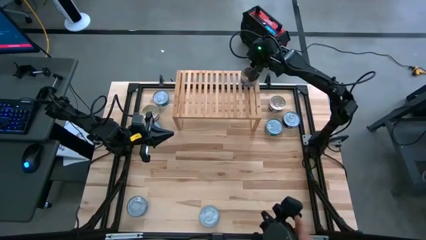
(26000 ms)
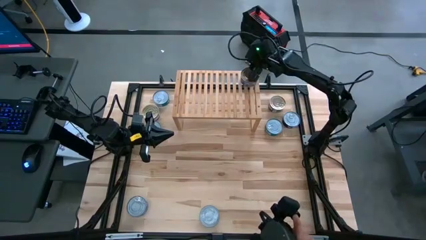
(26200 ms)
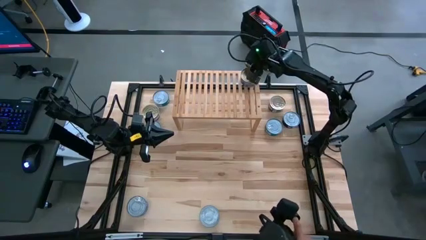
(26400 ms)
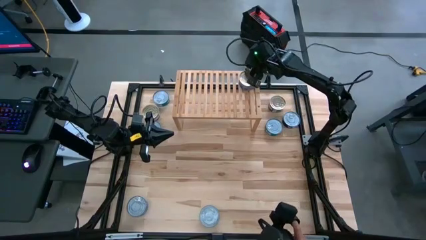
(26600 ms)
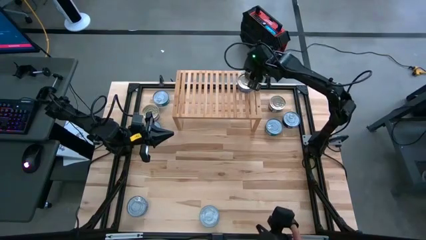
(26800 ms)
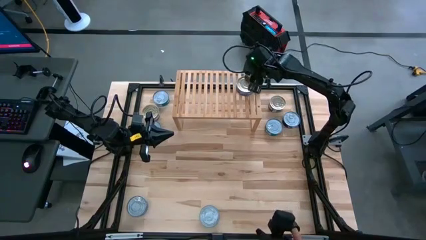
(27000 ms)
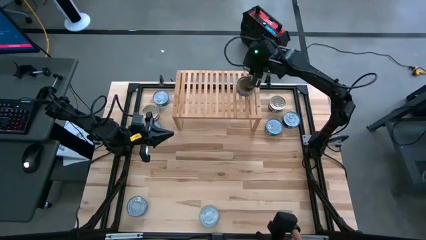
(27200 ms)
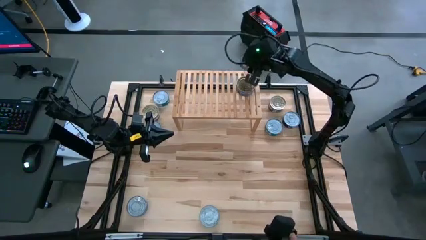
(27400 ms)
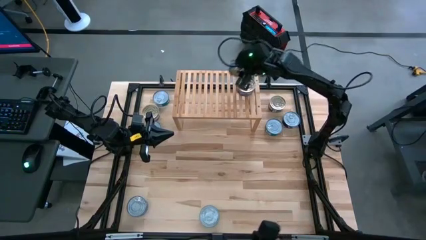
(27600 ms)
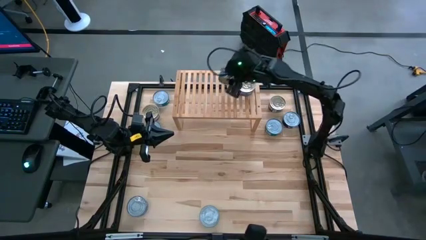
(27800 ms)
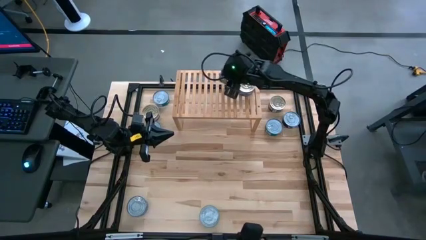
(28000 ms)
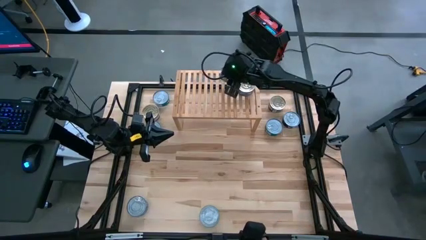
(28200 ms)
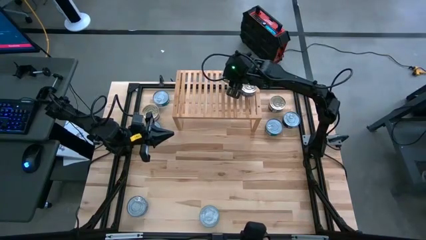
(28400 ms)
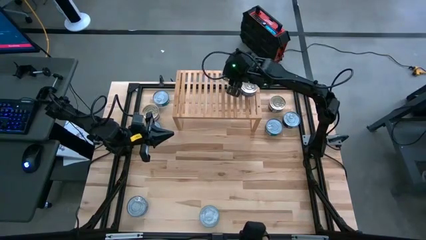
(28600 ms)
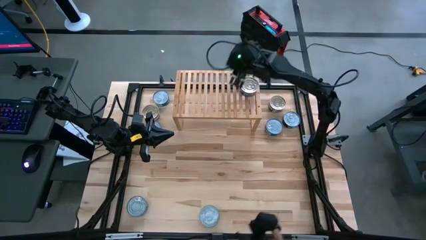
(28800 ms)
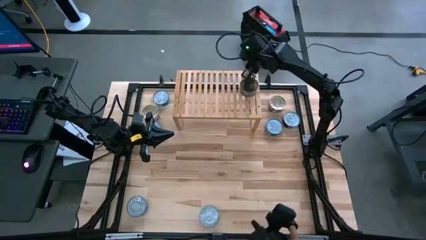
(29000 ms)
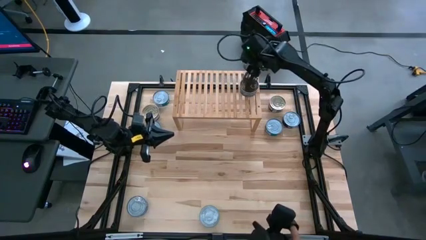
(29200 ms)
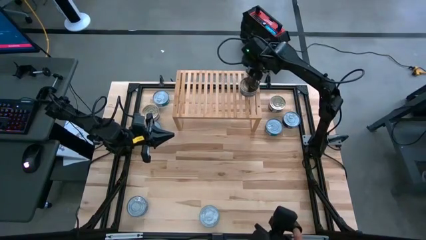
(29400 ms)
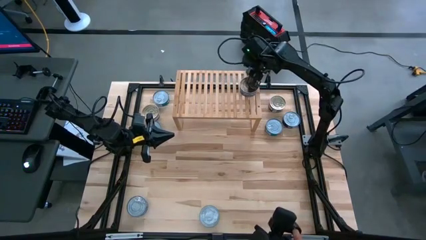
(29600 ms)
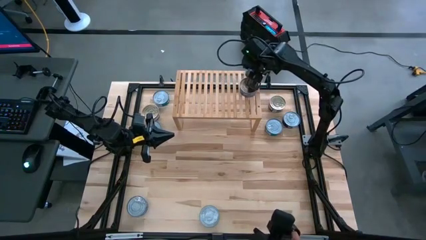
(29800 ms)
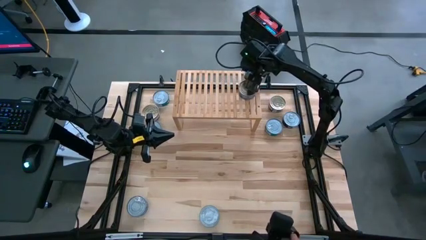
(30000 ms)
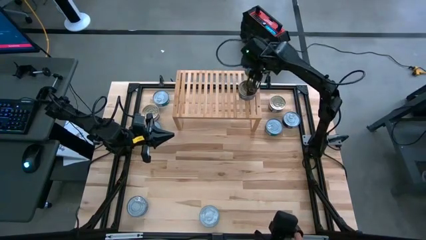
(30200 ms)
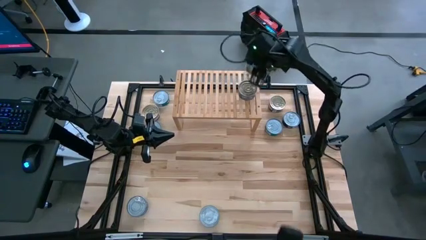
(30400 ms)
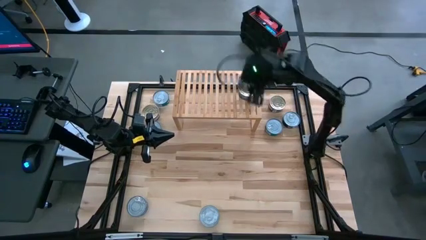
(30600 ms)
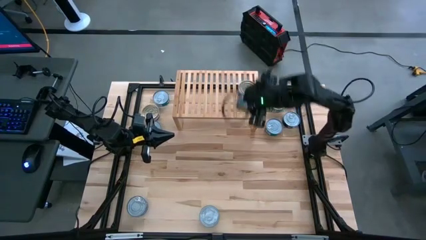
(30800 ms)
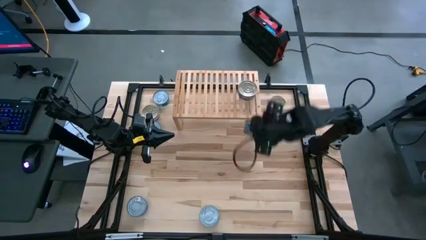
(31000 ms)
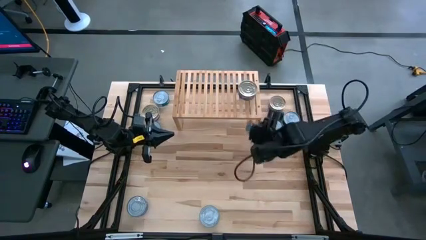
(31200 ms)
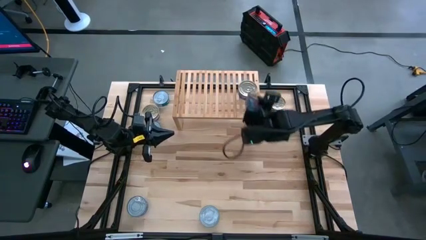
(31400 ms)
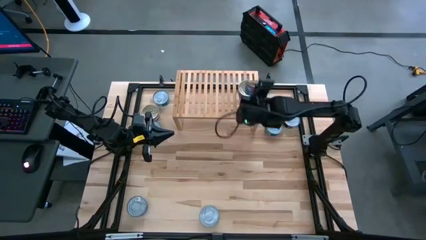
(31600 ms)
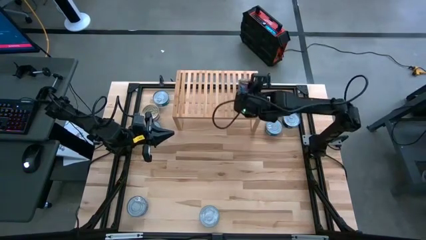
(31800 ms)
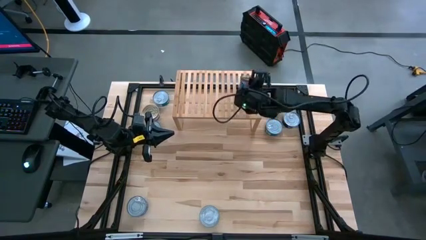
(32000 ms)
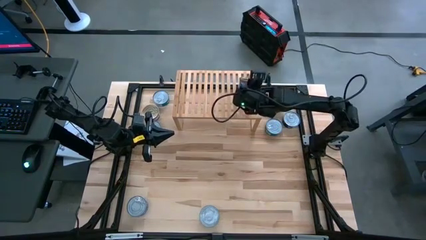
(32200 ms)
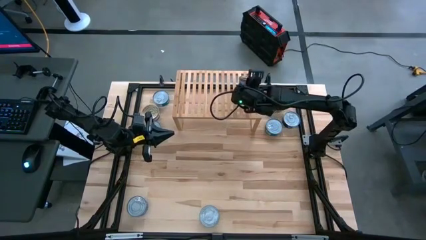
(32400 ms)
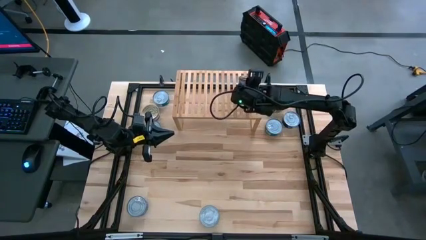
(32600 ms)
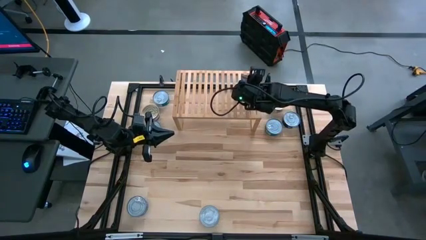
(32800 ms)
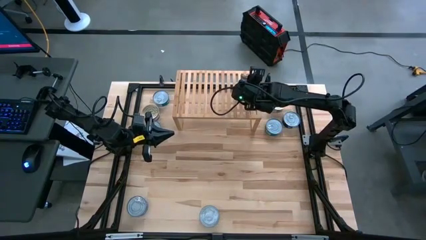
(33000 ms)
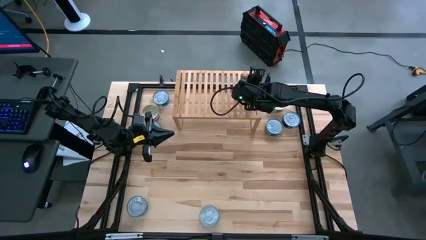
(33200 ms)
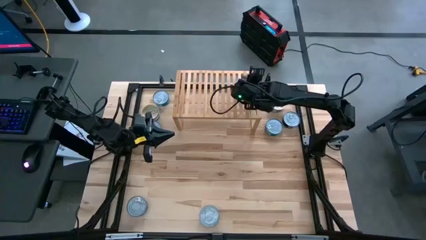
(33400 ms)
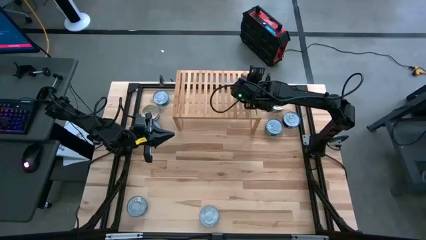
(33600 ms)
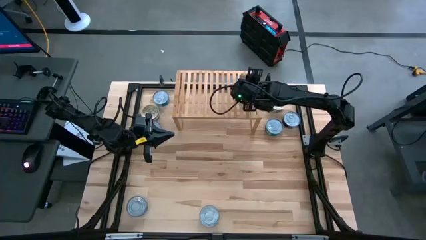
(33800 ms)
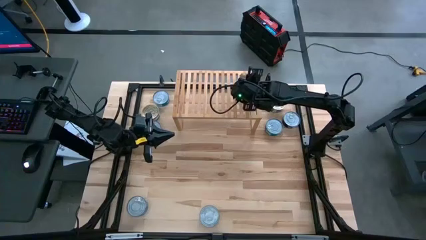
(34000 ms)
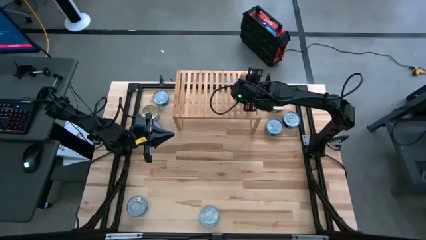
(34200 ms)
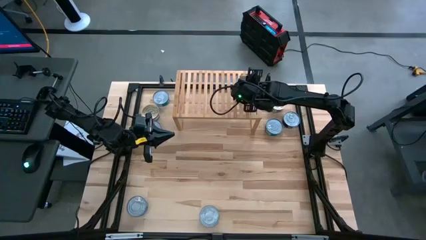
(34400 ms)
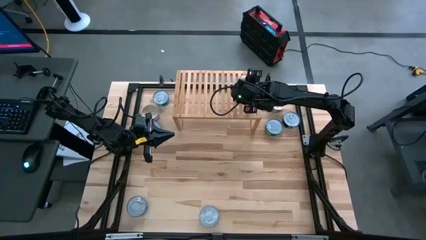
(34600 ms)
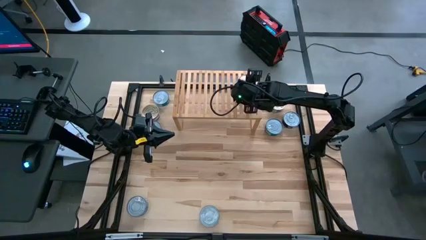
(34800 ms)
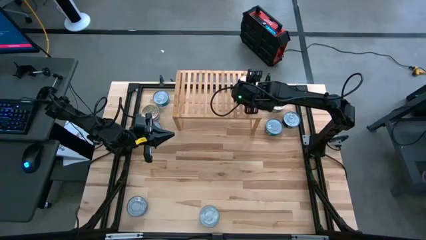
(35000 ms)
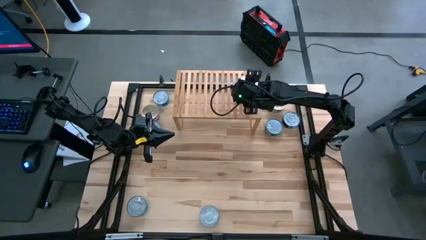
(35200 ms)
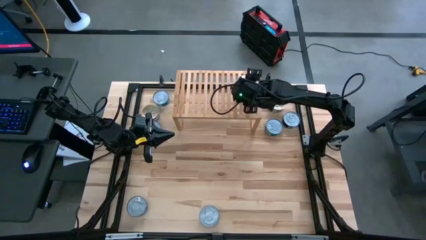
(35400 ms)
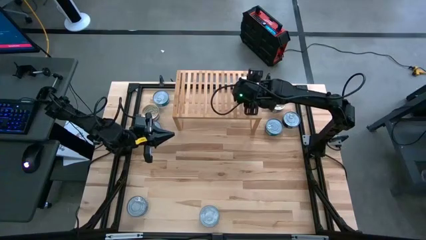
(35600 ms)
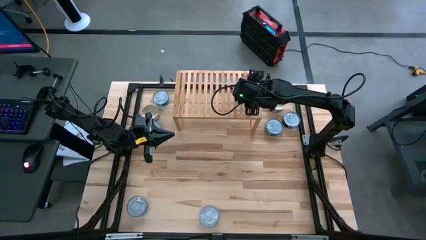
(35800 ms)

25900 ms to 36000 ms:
Task: Stack canned seafood by type on shelf
Stack the blue-pink tuna can on top of the other blue-pink tuna can on the shelf

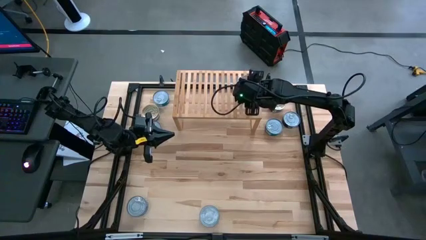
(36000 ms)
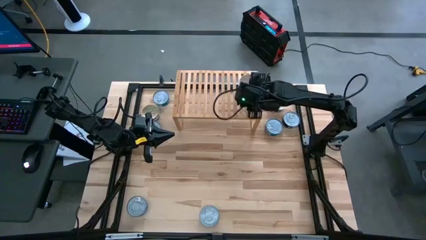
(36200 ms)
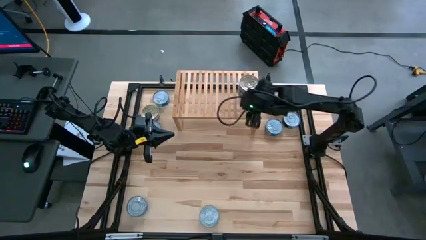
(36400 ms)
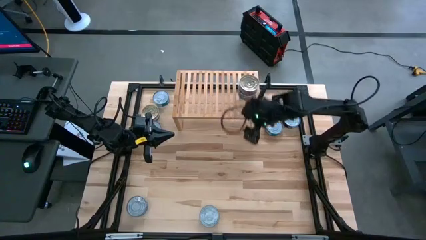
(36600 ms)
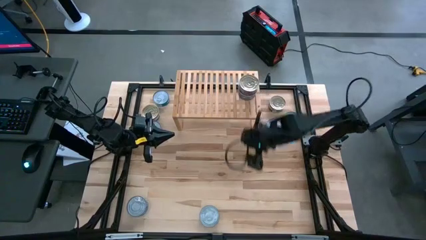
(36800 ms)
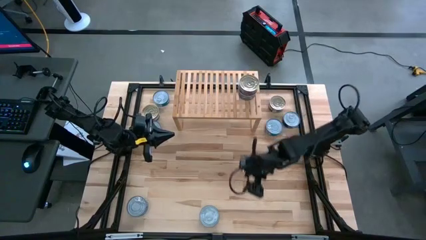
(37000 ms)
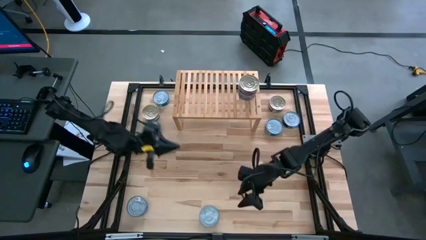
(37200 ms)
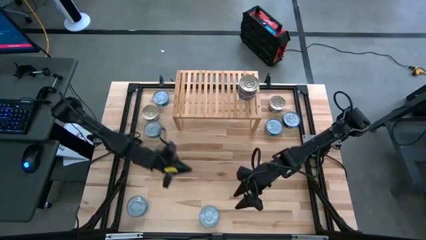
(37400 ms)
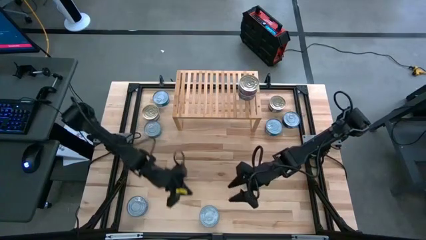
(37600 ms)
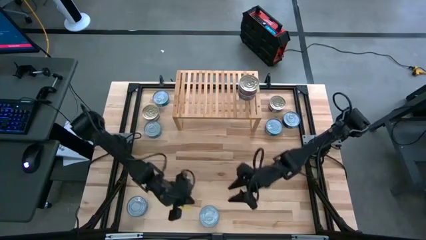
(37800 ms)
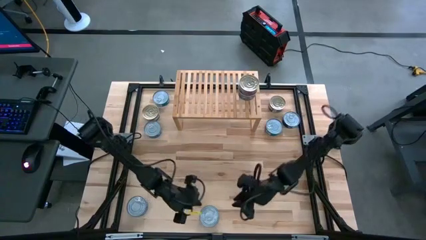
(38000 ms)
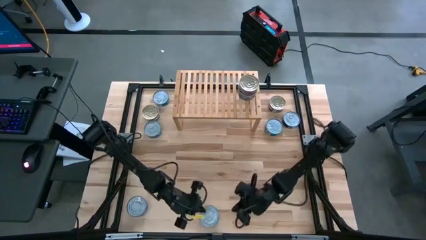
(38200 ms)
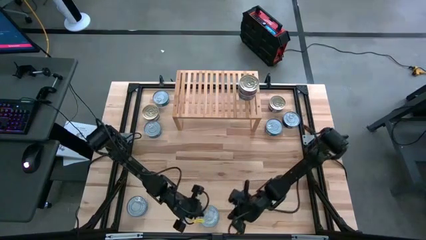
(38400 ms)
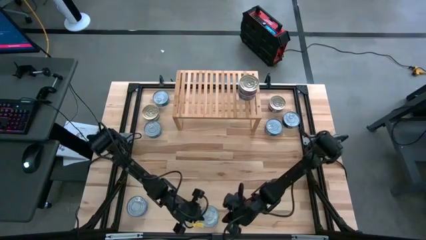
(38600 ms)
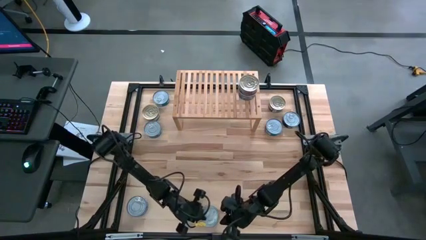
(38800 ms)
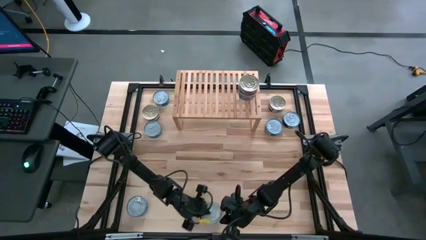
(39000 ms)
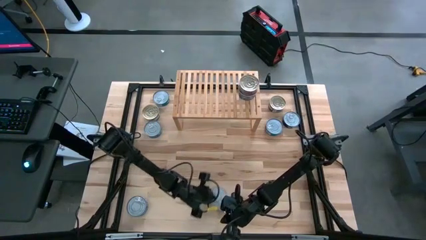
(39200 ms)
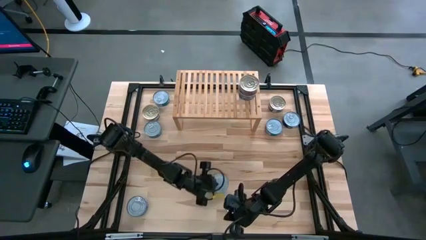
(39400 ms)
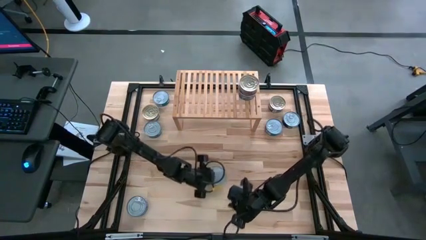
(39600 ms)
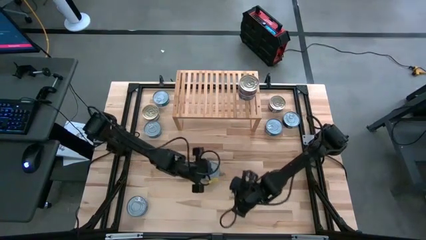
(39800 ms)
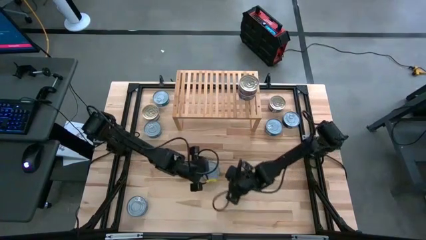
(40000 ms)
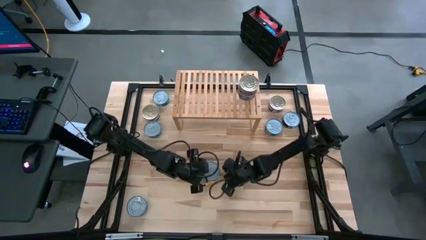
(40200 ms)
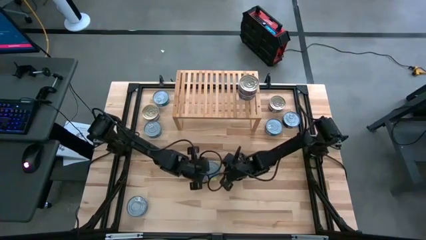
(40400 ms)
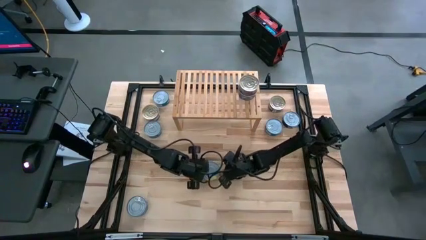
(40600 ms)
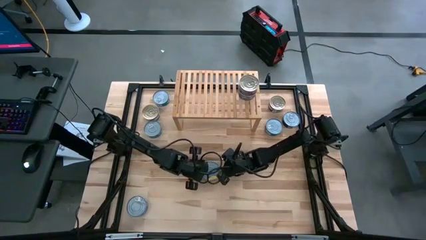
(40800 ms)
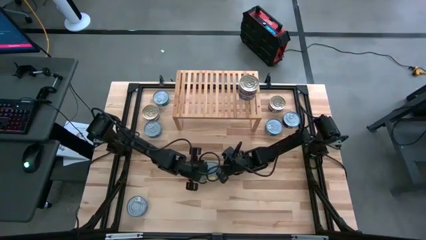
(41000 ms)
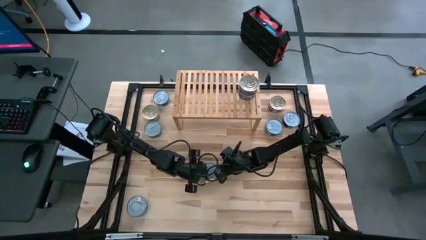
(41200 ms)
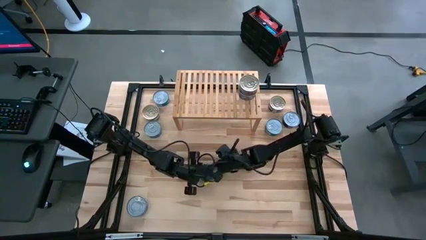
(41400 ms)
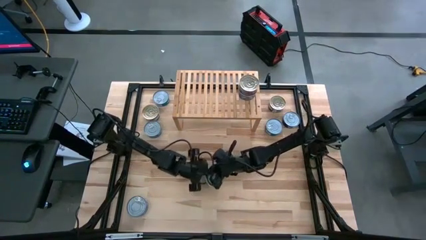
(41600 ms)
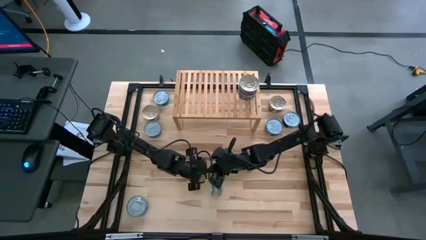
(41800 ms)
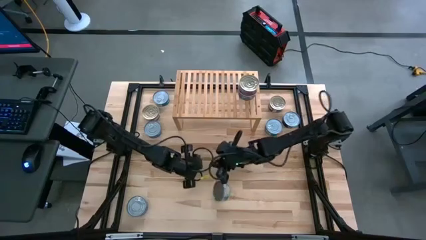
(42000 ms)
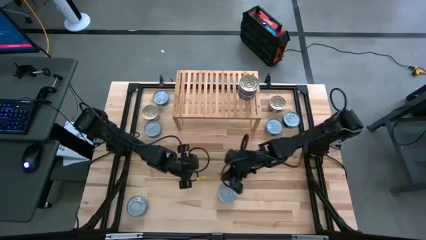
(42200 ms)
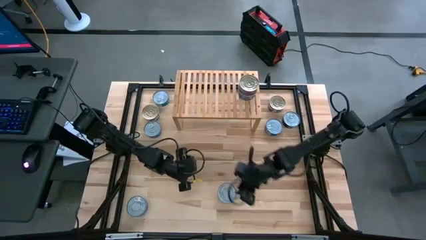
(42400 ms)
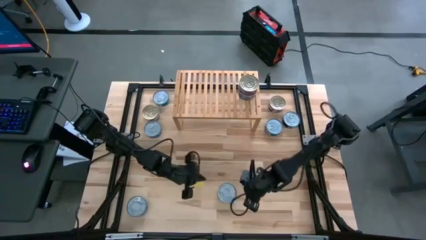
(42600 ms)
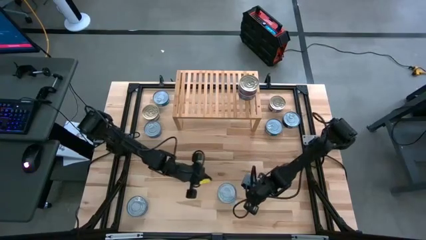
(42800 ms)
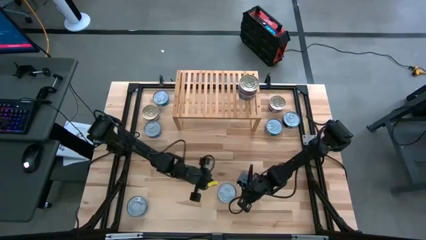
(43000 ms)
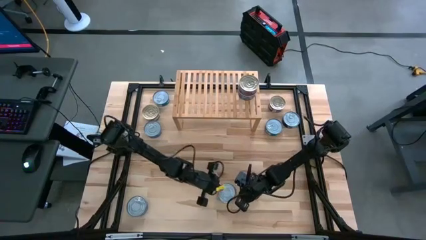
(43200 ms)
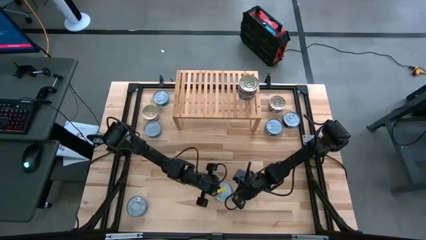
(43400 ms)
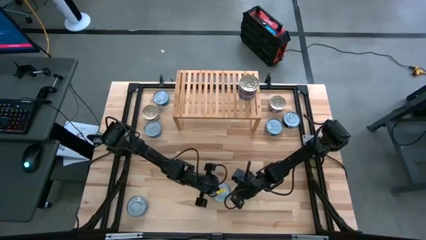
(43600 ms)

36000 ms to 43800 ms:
Put the green tuna can on the shelf
